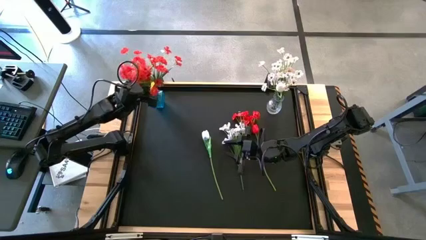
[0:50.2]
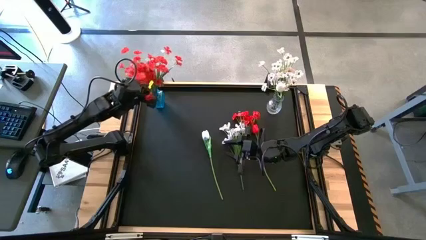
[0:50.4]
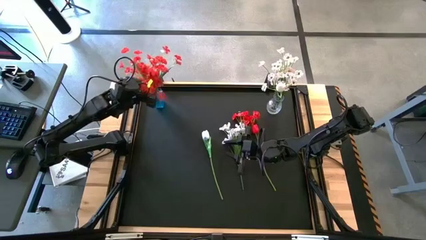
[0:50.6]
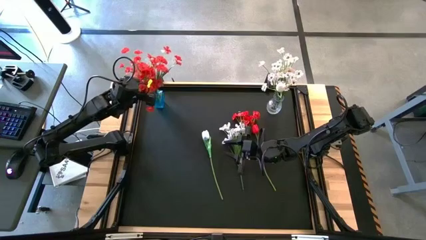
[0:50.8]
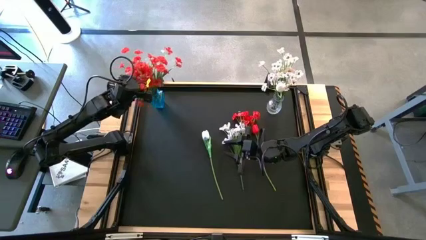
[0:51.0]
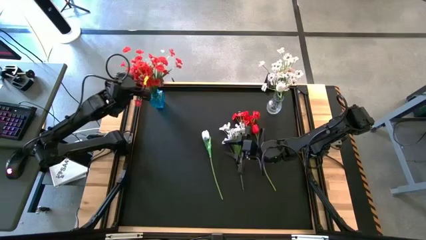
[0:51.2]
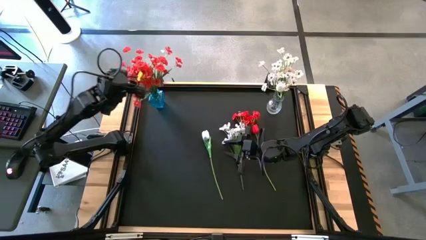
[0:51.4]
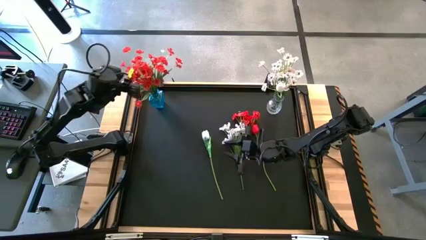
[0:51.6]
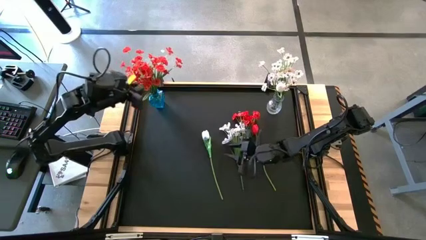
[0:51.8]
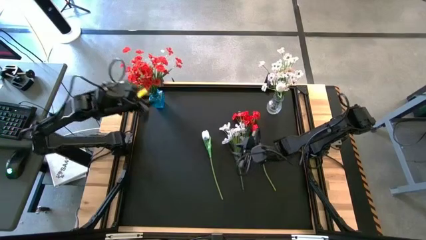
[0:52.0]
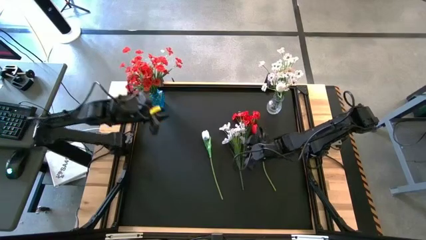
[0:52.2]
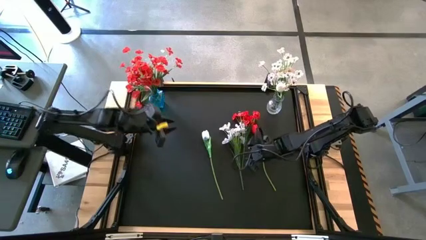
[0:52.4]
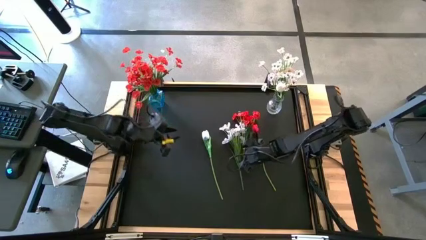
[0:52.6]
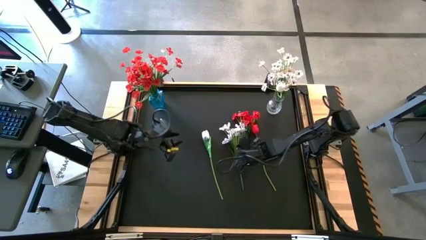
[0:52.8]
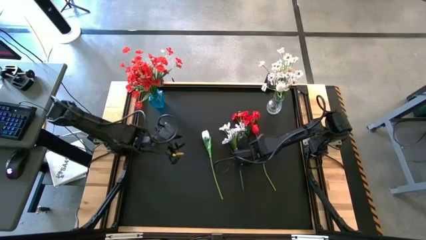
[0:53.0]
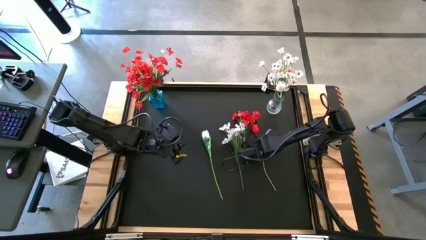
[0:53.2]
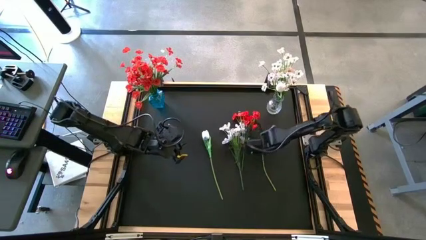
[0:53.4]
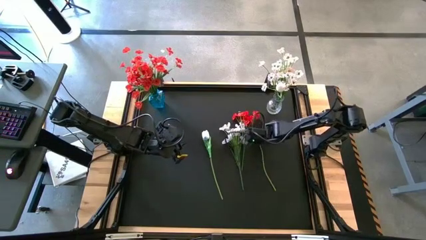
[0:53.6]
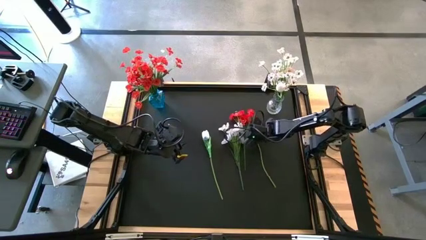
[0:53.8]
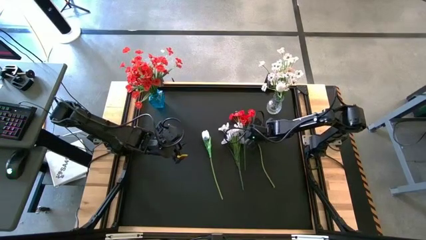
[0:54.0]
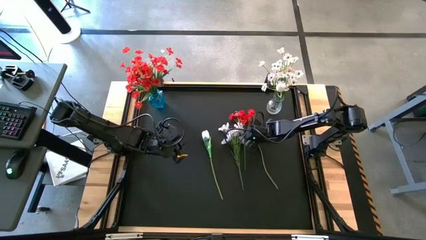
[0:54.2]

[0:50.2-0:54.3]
Task: Sort flowers into vase by color
Put the orange tulip into the blue vase

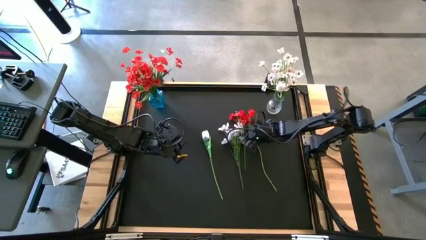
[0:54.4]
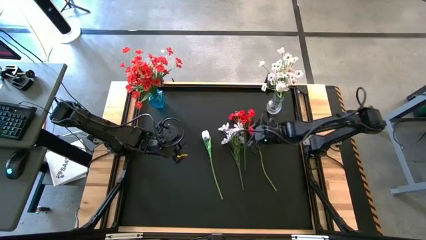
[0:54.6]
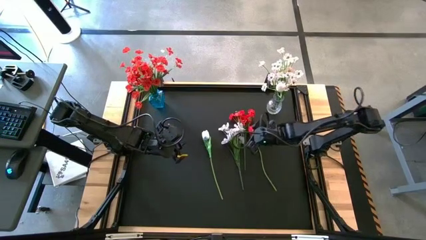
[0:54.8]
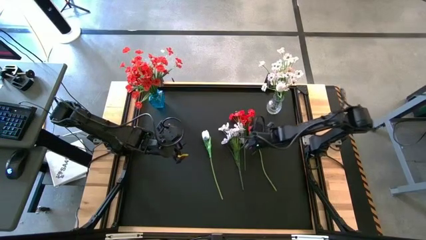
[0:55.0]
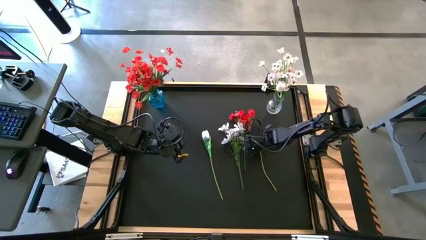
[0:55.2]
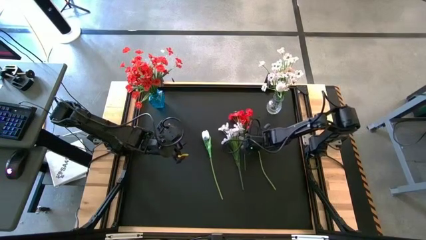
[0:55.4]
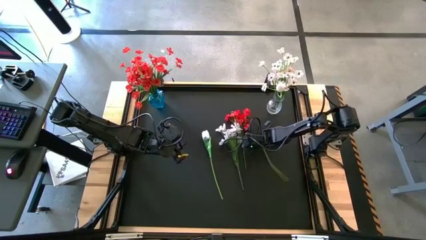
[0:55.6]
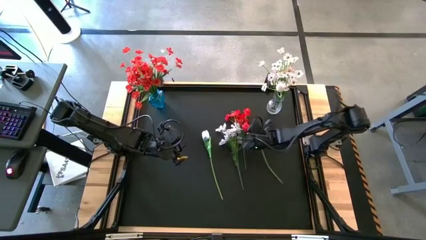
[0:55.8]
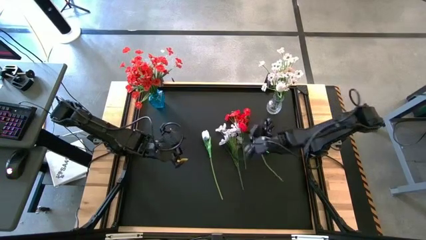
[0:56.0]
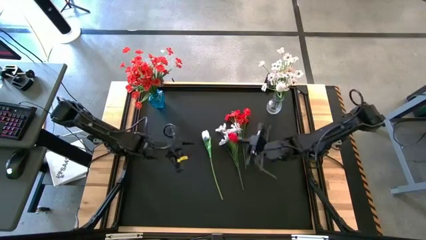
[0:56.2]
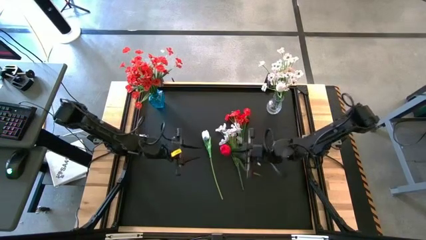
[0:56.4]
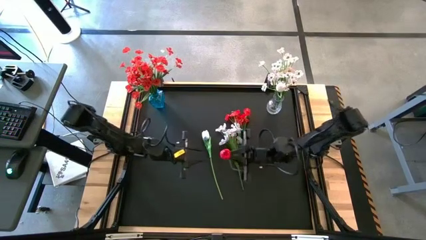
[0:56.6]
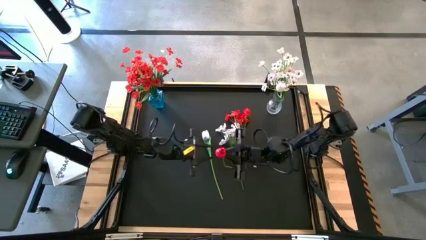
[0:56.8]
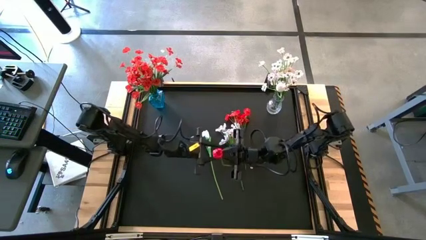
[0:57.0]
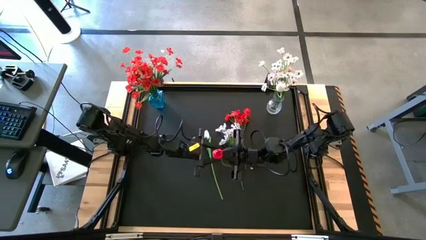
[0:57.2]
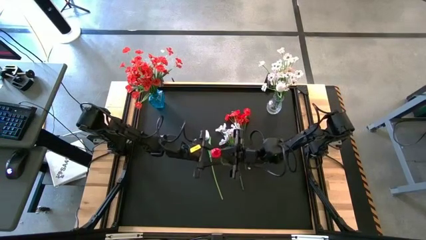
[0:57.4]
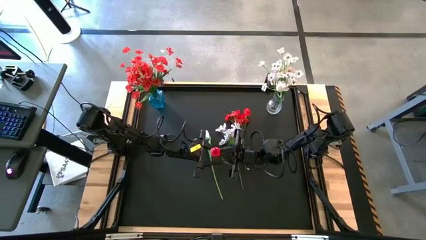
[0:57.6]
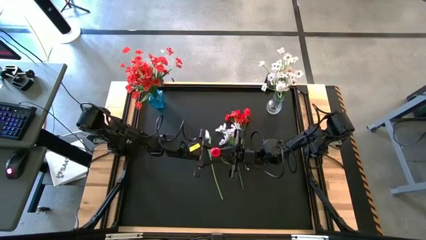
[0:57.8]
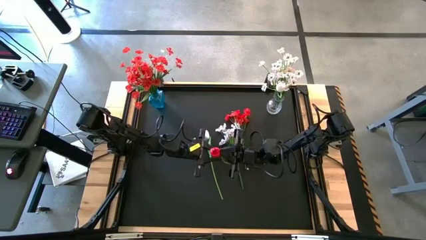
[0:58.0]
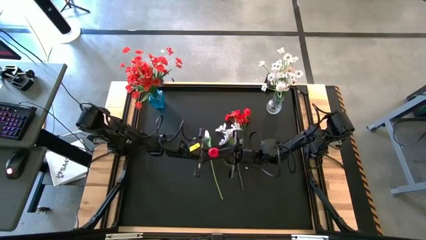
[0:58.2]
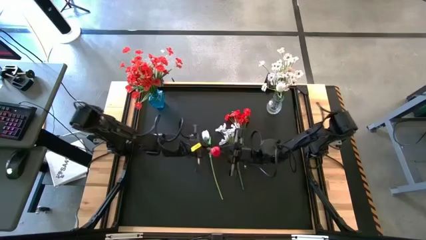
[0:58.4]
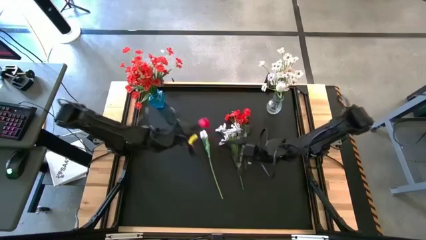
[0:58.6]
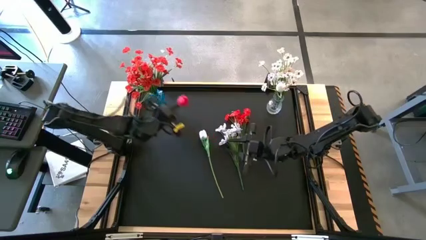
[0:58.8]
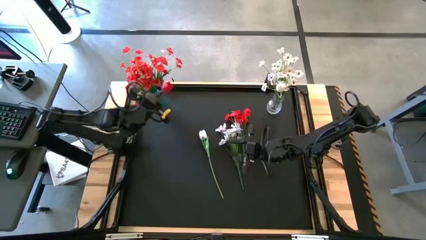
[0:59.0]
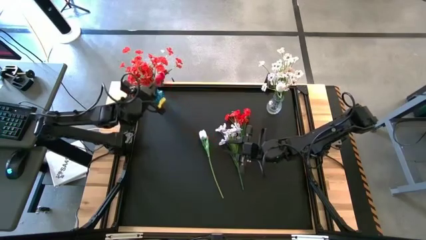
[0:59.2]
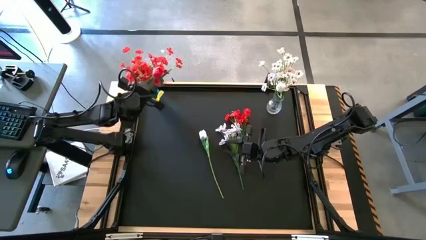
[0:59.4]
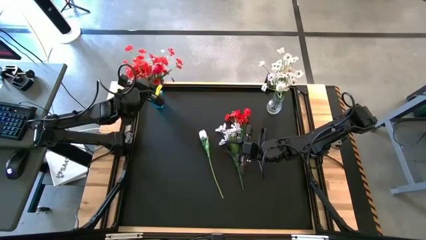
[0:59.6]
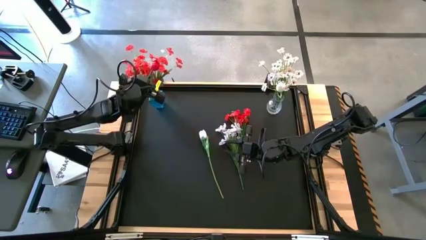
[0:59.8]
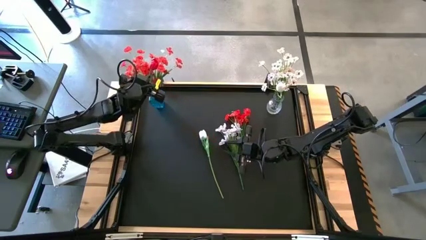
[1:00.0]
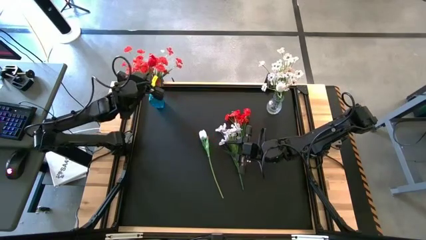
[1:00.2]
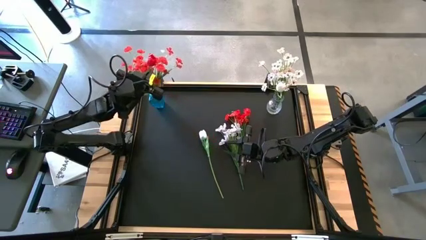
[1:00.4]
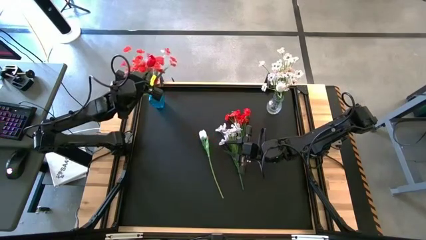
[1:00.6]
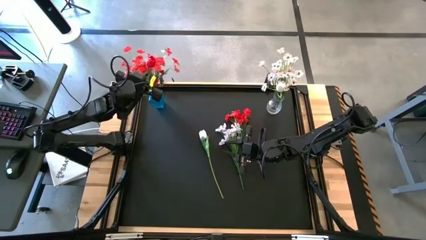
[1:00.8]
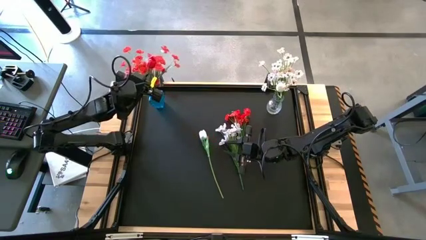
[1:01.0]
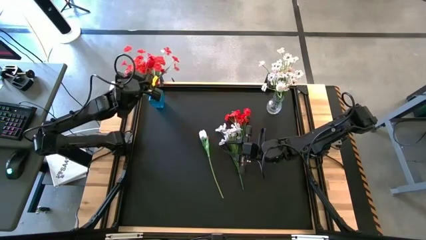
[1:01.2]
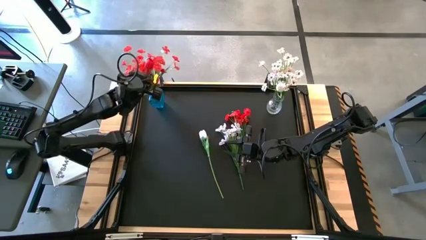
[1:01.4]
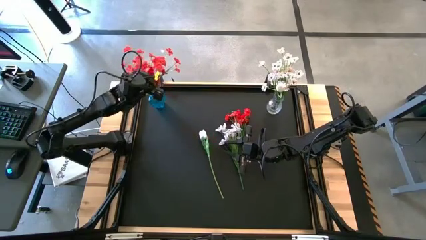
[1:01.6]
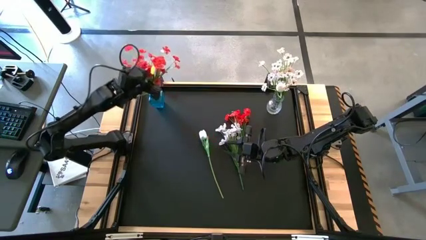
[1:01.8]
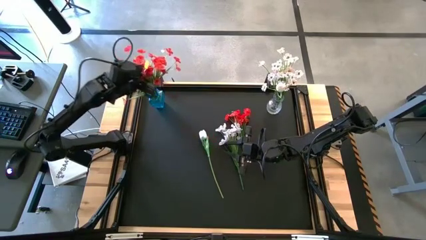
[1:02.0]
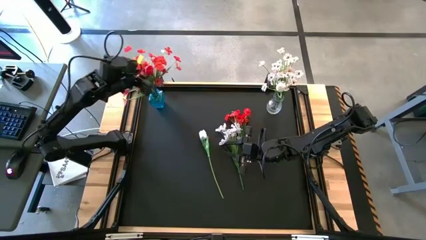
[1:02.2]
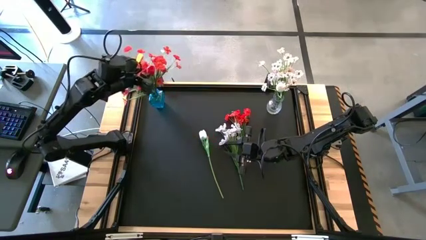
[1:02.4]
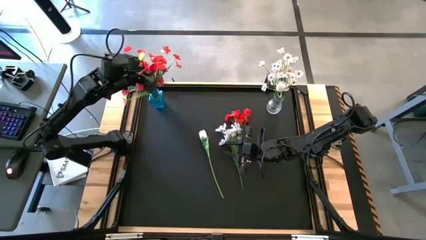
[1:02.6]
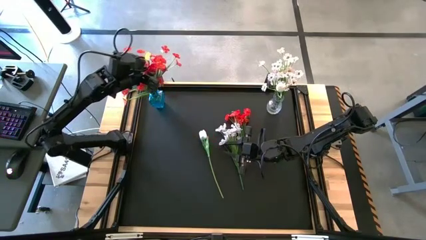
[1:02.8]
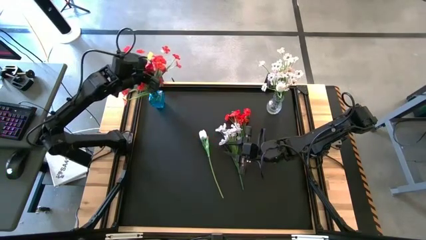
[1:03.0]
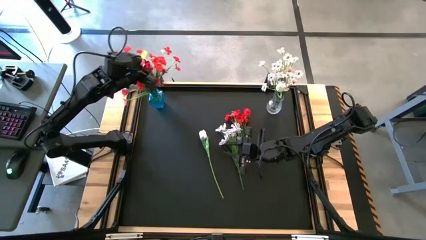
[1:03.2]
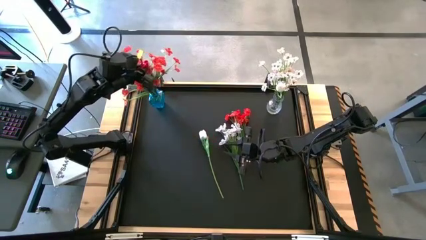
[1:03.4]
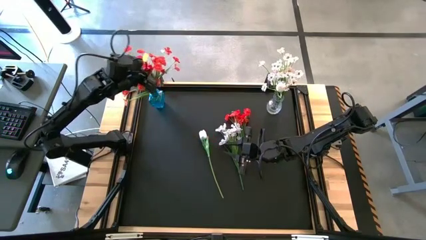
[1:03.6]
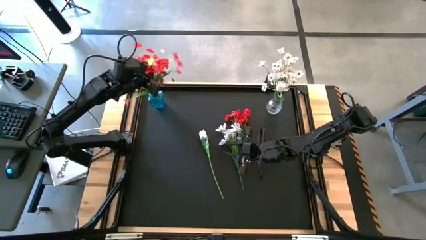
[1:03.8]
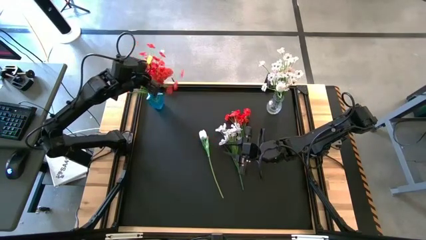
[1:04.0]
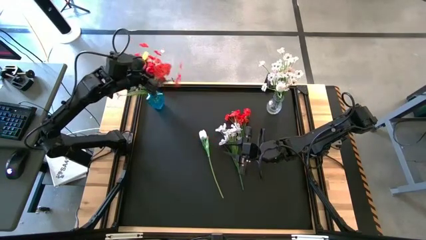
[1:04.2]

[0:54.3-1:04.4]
Put the orange tulip into the blue vase

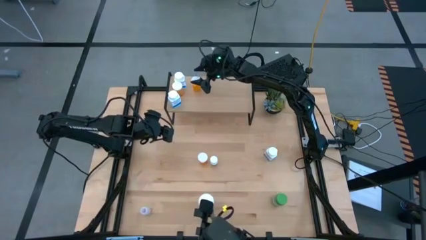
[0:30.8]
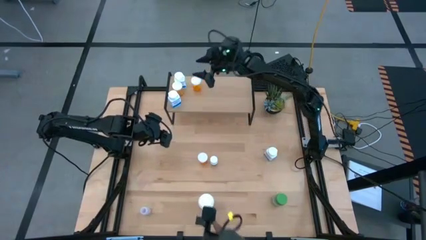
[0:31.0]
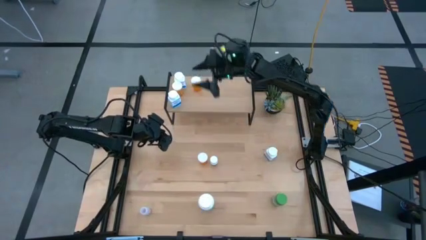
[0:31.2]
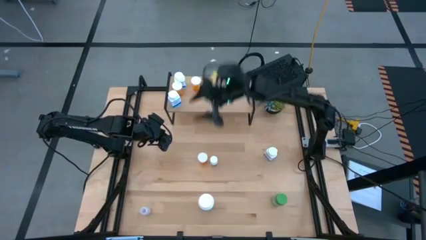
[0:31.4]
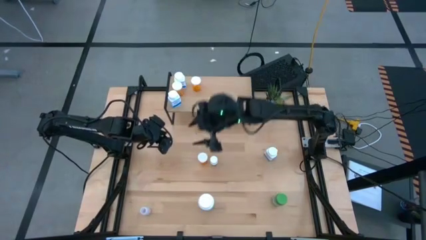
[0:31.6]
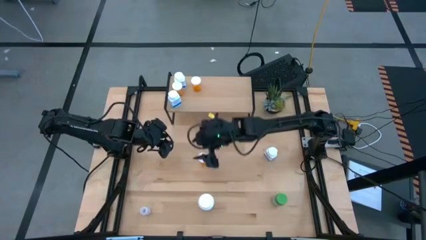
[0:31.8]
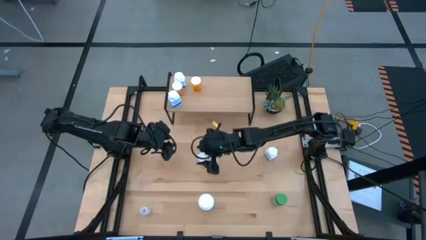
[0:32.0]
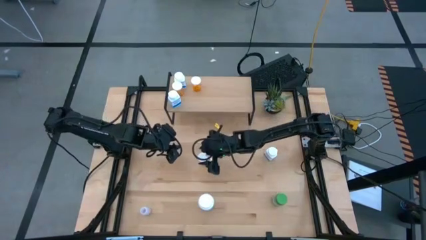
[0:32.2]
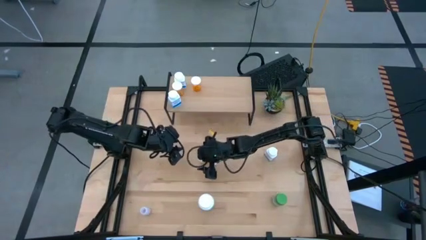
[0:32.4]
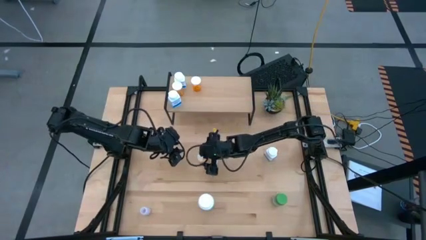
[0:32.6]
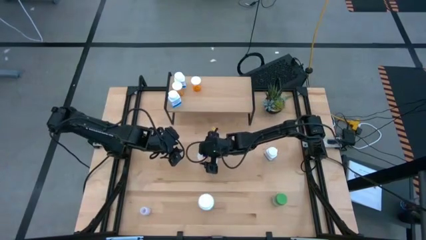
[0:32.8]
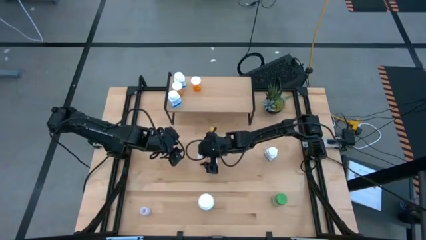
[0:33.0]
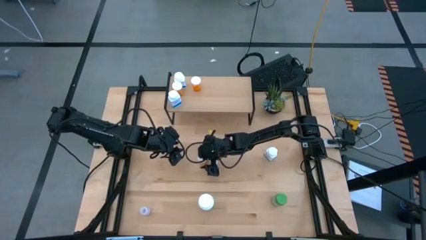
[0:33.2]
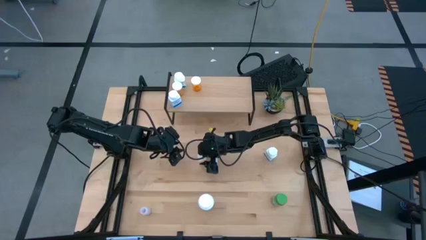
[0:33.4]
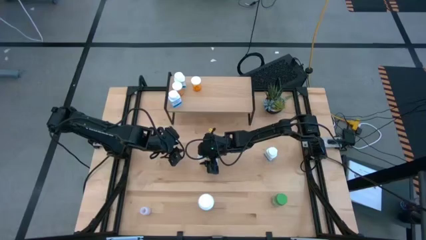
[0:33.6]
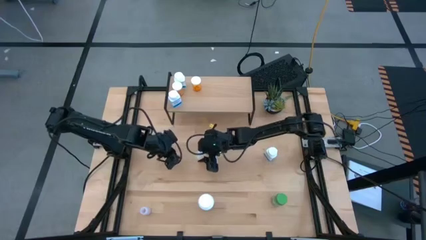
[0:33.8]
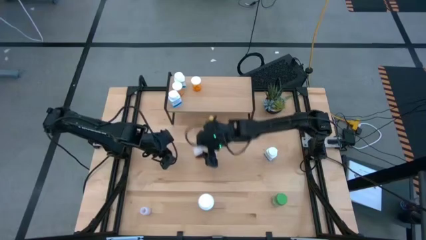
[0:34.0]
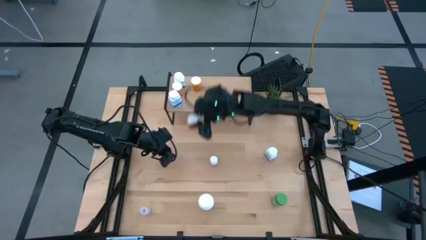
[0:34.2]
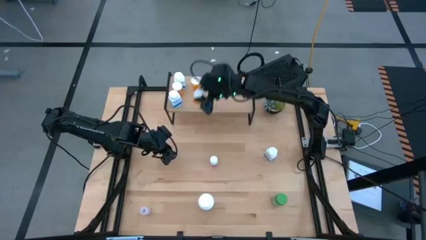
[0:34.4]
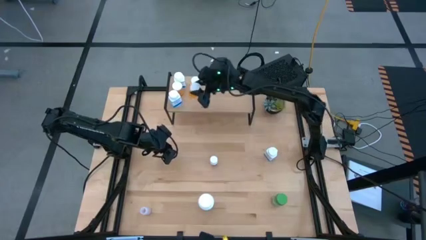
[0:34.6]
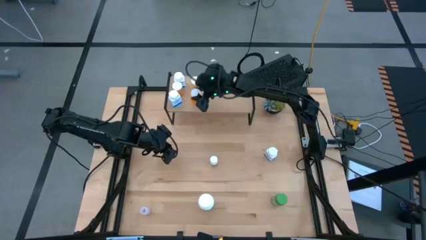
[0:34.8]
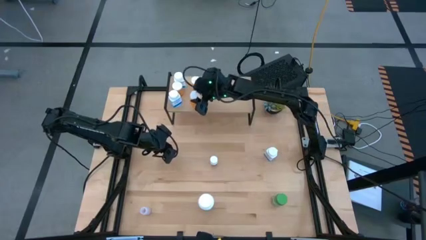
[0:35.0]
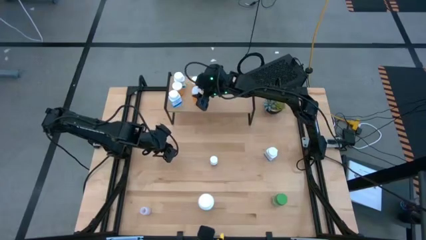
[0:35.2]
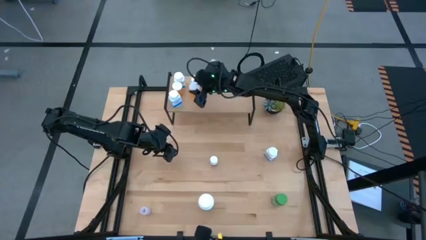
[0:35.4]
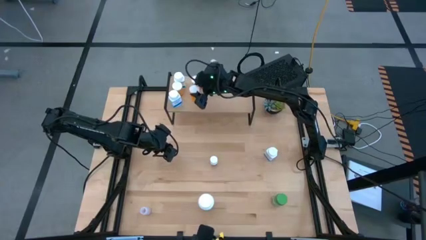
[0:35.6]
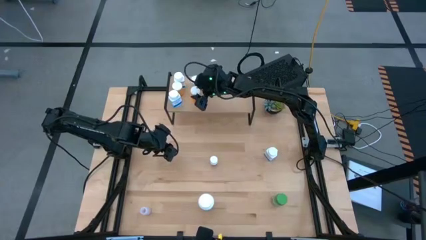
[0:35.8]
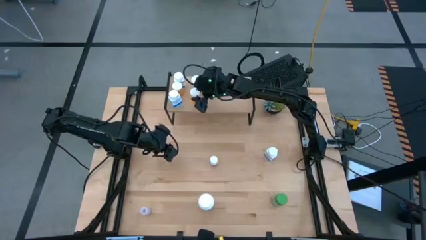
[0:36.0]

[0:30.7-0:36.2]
Task: Pick and place medicine bottles onto shelf by color
Put the orange pill bottle on the shelf
